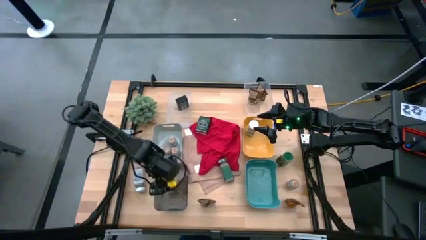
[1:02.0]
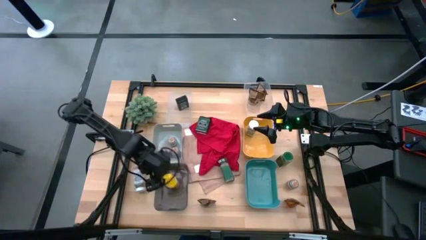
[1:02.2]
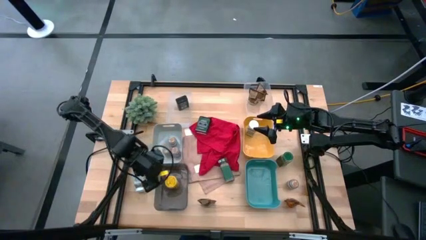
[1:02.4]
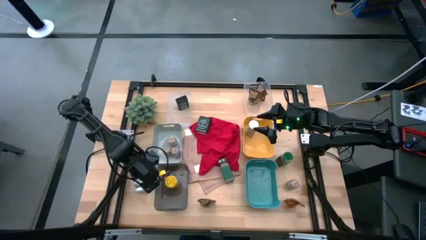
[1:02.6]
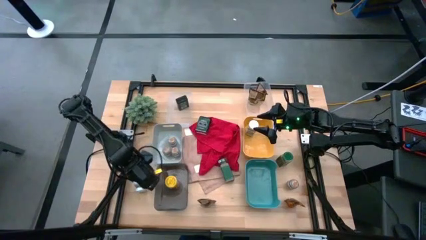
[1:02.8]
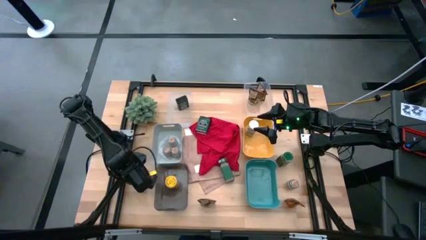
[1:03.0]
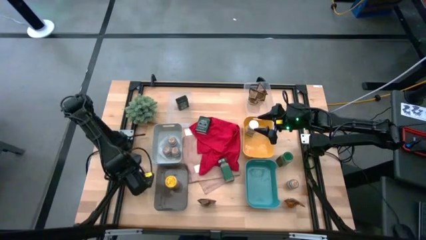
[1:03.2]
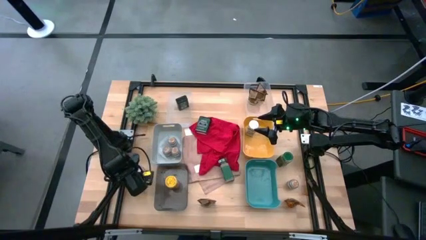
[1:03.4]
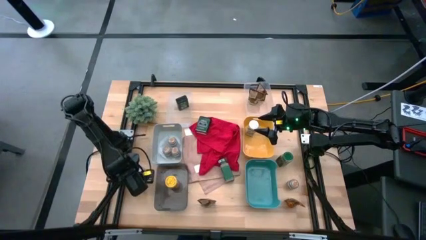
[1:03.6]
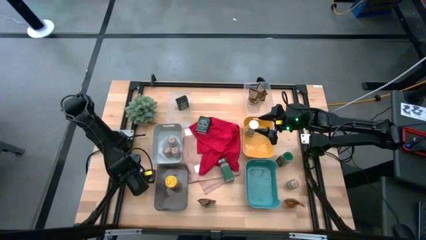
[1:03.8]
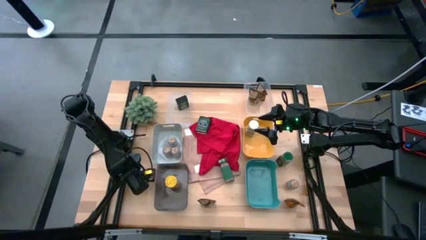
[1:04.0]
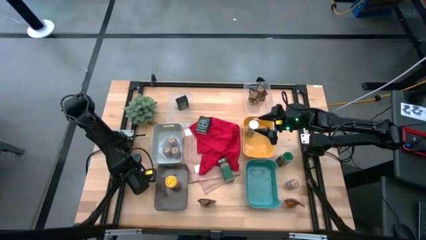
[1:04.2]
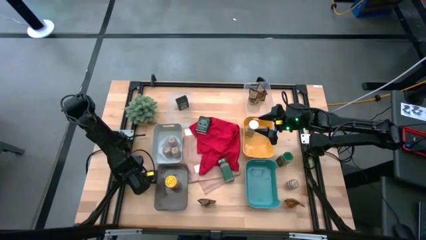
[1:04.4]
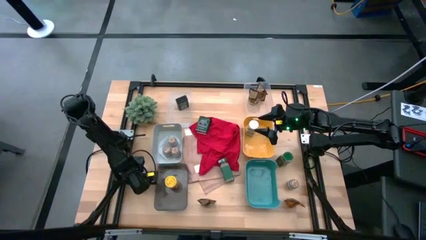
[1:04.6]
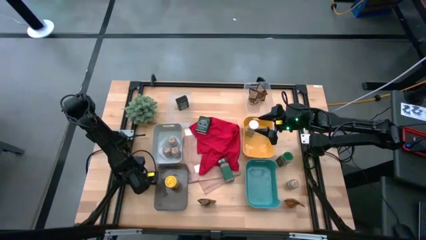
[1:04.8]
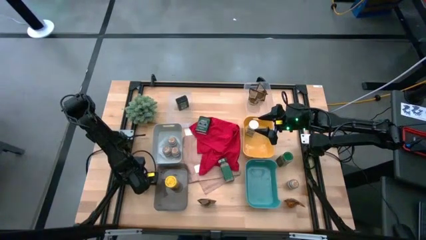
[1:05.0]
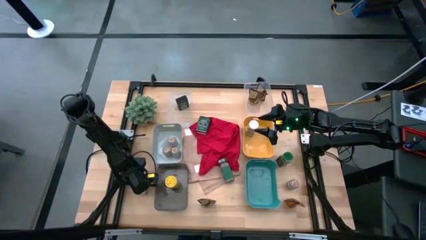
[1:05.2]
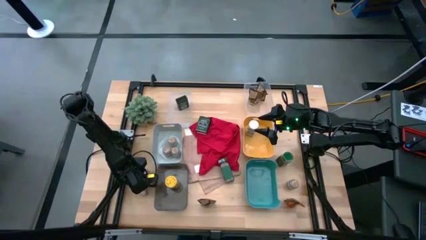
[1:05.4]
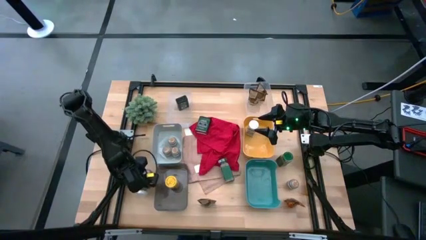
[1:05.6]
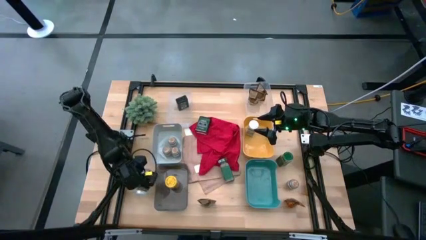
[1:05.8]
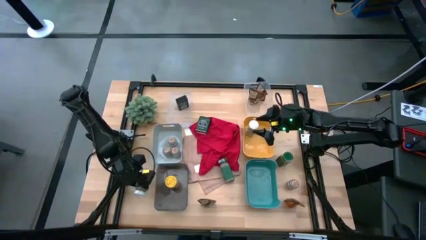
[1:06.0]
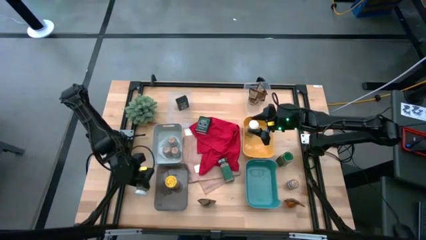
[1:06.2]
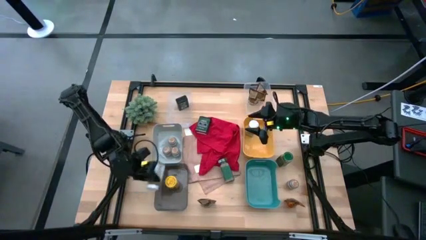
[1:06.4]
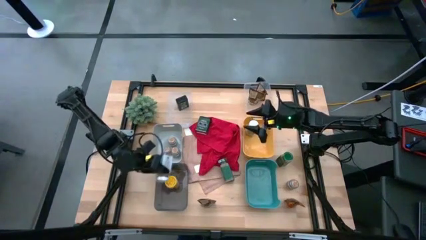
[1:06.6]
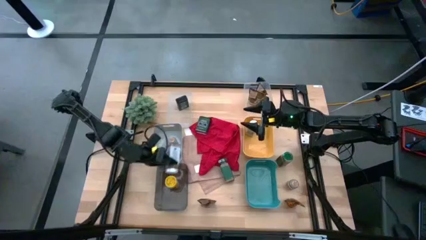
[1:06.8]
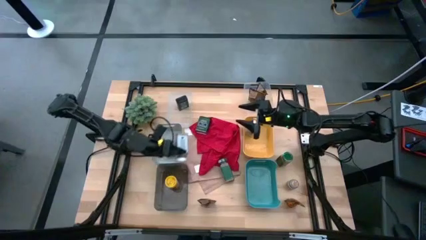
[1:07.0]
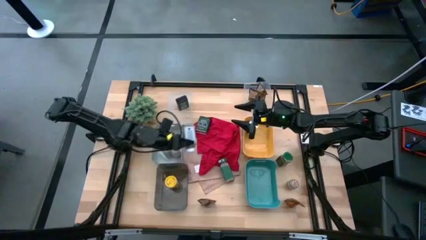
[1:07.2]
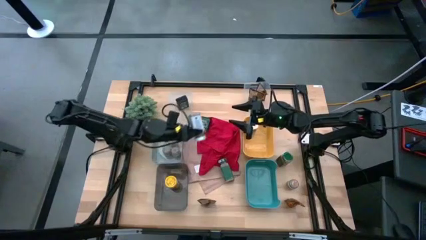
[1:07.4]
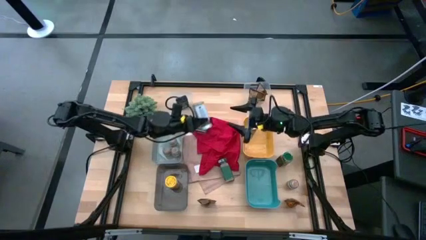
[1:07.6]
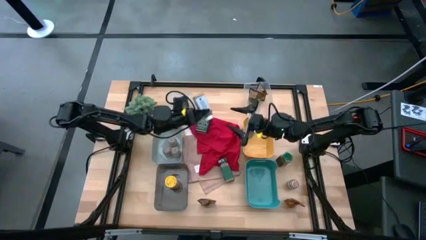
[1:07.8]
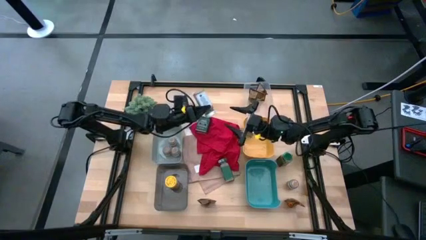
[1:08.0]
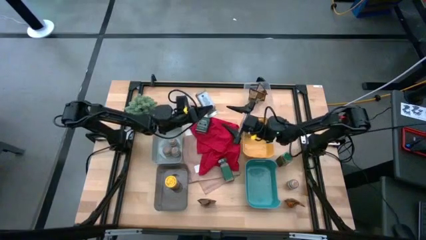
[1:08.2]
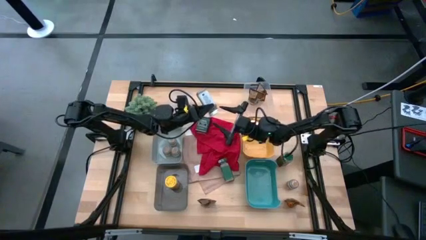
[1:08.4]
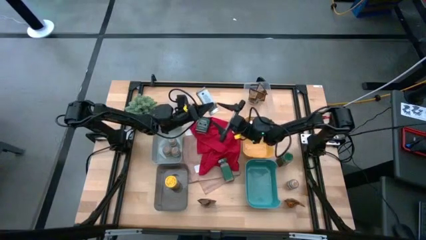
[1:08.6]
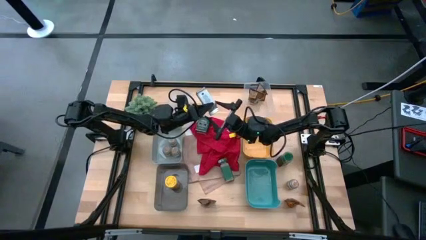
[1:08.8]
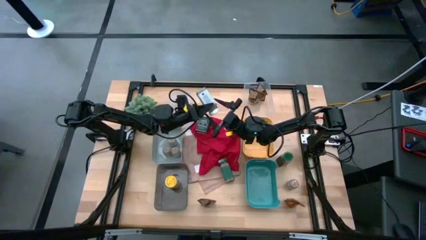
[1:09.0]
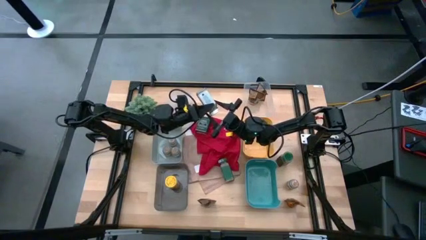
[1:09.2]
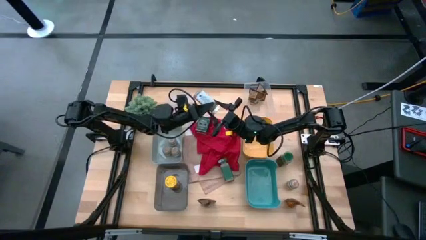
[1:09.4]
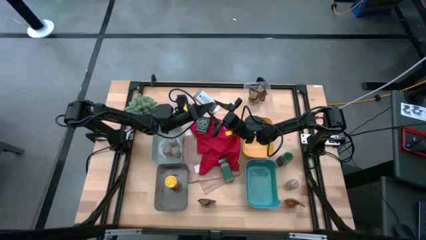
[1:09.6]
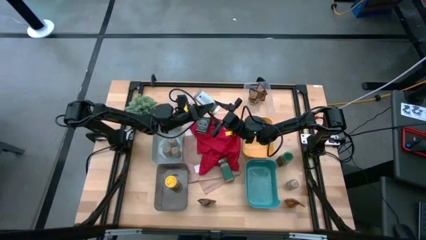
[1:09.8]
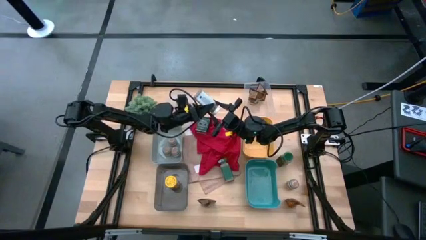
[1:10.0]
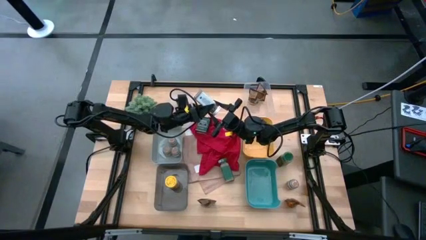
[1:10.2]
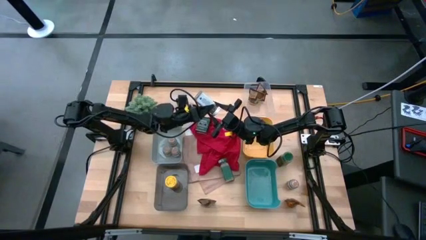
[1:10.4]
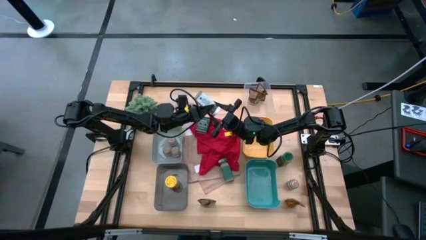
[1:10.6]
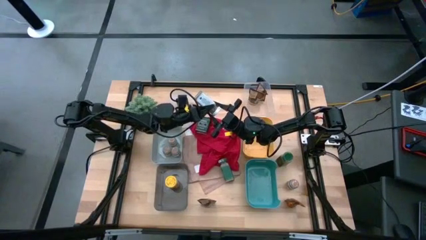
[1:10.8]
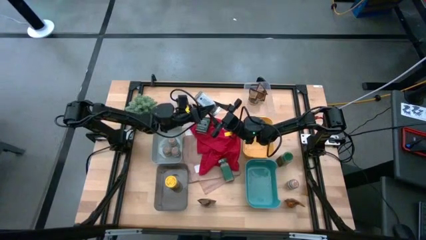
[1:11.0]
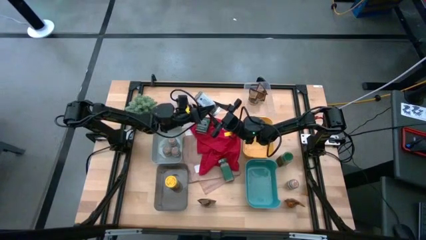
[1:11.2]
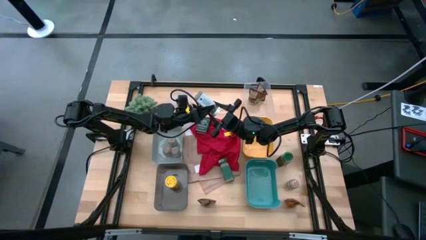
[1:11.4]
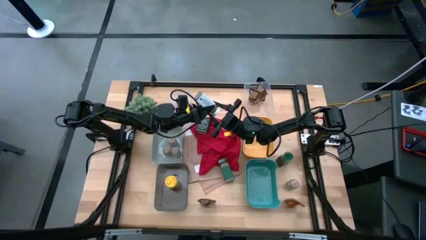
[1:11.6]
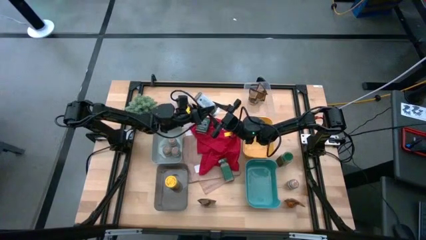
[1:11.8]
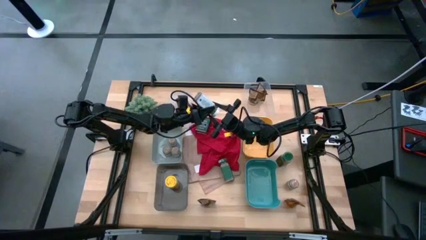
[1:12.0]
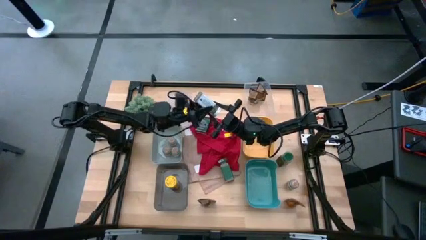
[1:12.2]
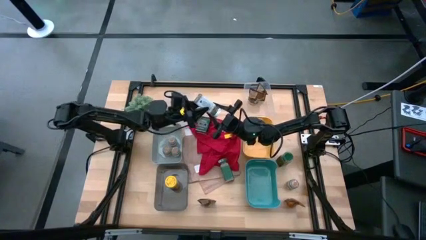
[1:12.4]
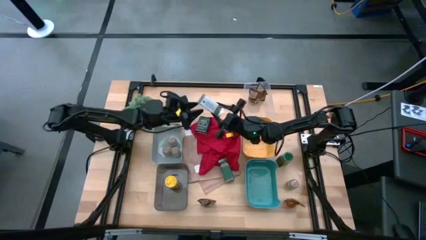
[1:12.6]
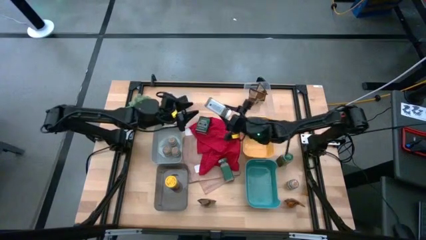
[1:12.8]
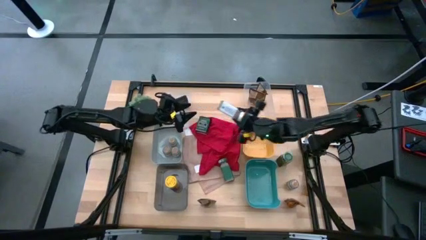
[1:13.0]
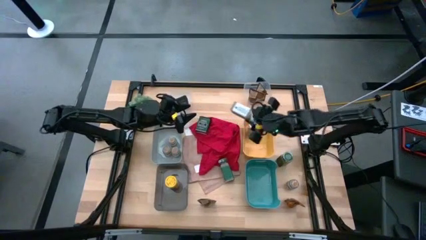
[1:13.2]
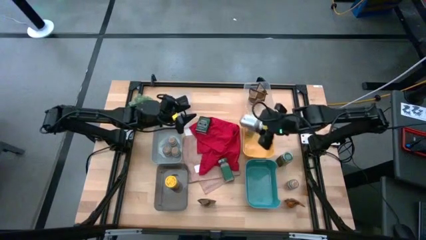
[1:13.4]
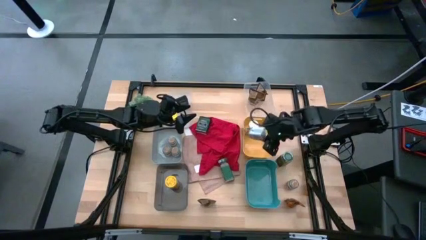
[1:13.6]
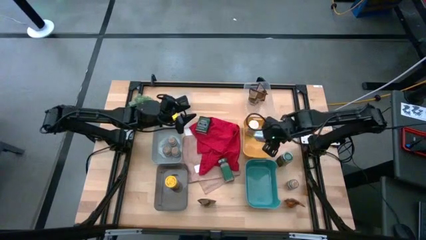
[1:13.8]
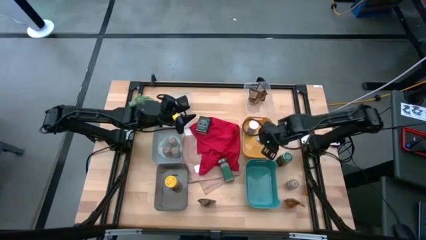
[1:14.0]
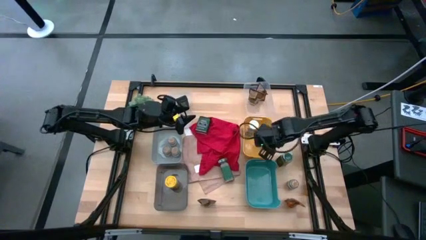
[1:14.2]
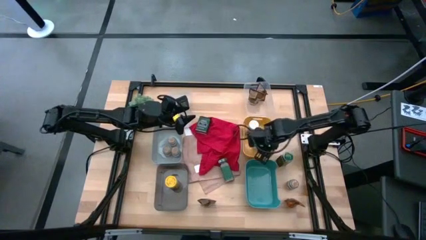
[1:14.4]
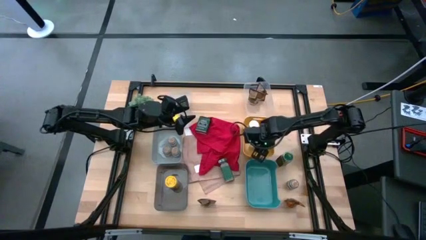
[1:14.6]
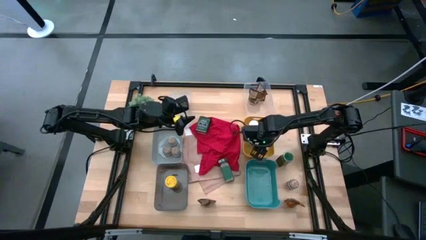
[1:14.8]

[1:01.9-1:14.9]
Task: Sort spices by type
Put the white seasoning bottle into the yellow bin

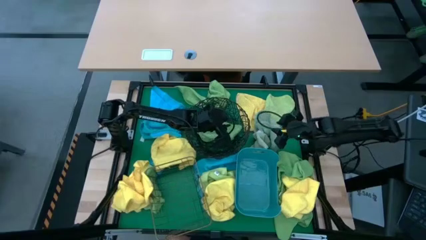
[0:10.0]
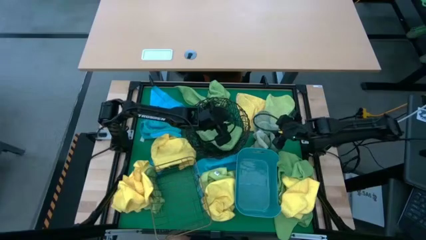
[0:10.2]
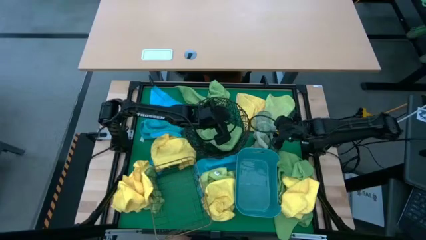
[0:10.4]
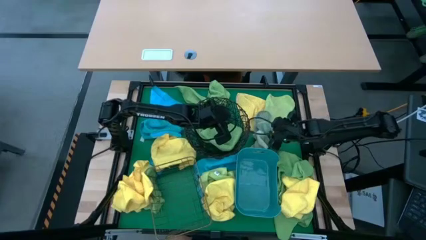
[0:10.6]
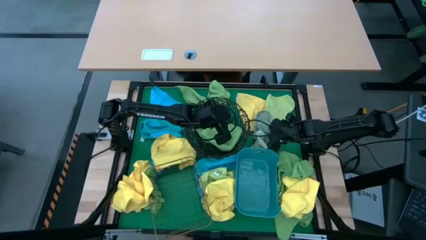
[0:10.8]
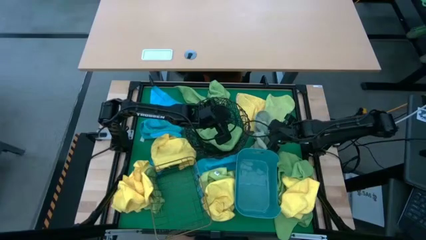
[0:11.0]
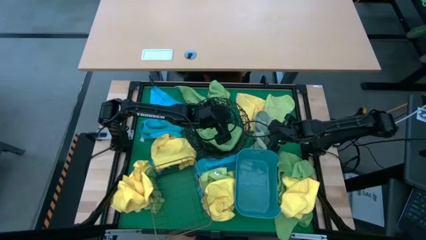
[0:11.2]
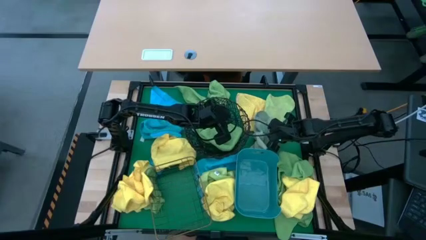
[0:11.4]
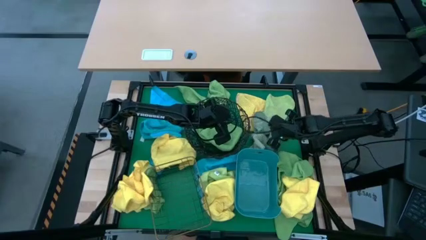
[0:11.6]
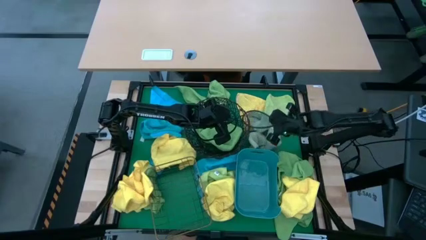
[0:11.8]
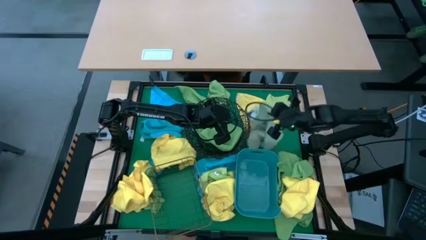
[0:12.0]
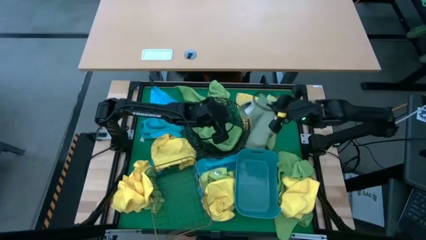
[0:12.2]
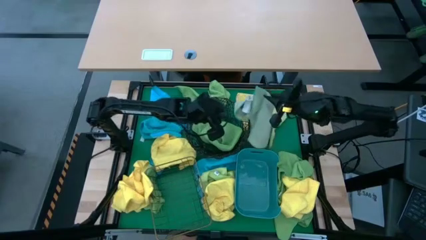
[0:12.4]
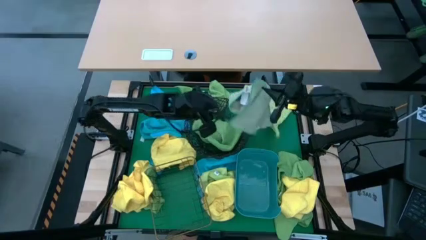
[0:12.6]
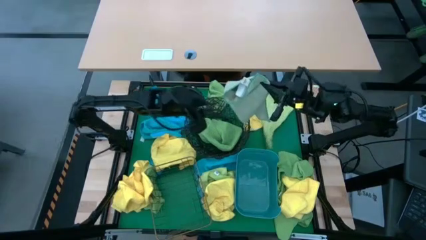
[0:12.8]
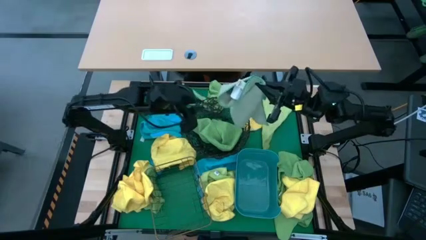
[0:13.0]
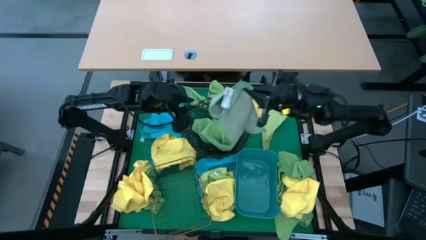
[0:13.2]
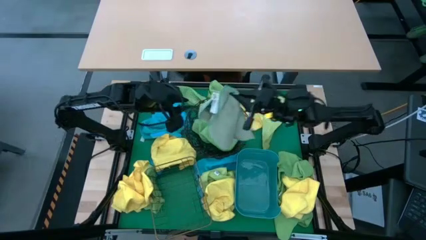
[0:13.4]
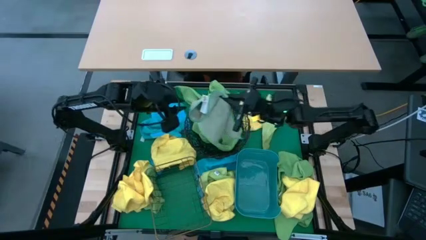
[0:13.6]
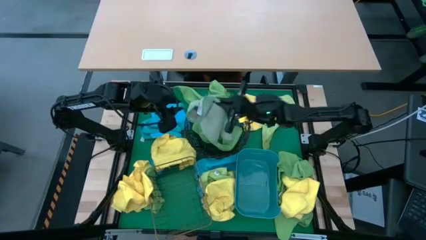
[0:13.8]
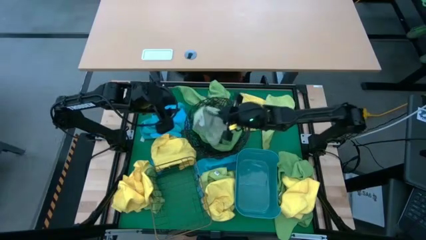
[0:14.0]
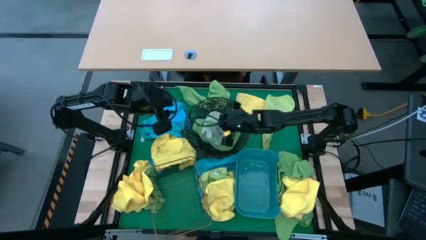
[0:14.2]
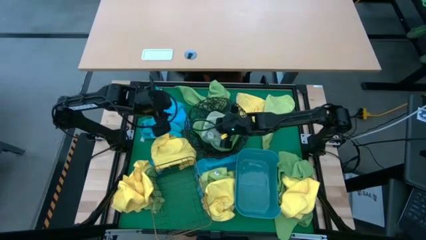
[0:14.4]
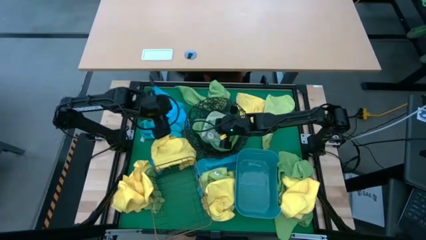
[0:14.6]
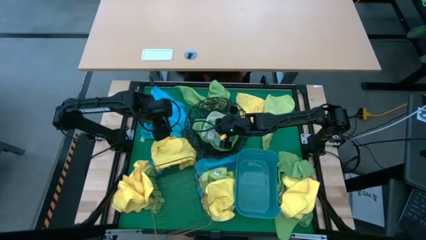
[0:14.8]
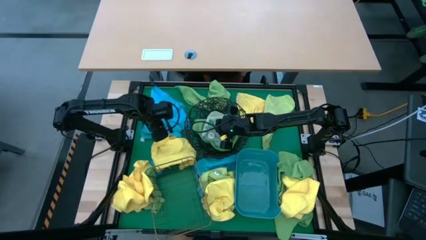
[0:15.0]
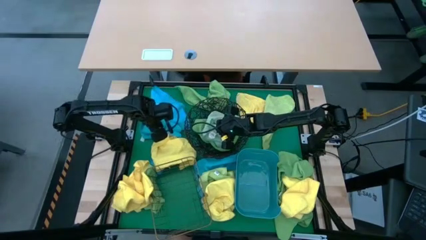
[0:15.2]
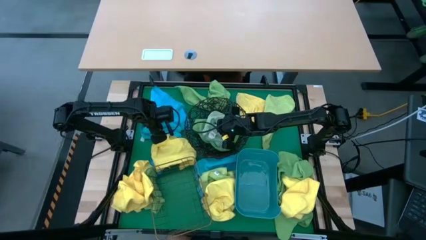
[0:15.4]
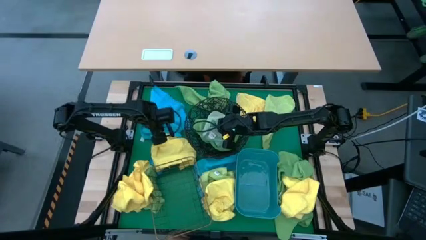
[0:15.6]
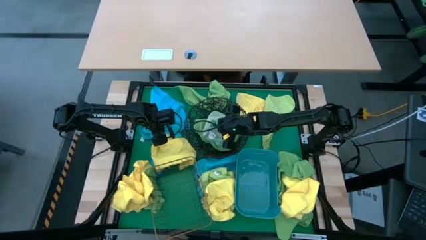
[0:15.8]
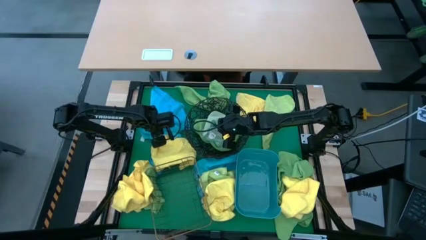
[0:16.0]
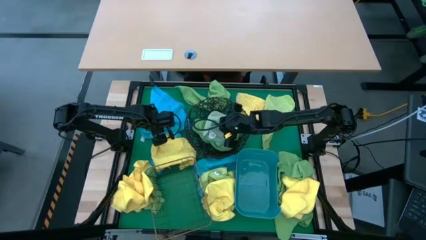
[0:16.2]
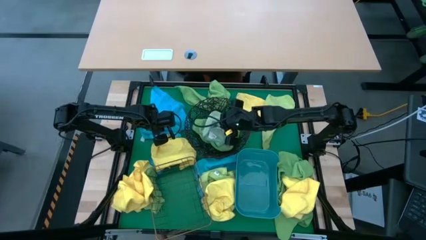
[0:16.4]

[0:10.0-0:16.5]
Task: Sort microfiber towel by color & place in baskets
Put the green microfiber cloth into the round wire basket
